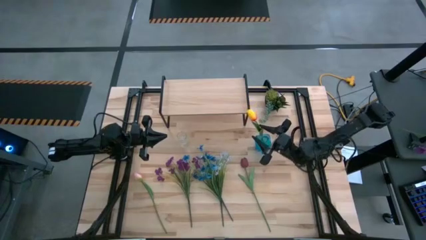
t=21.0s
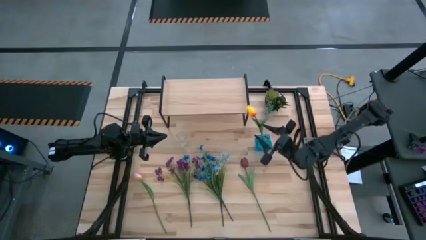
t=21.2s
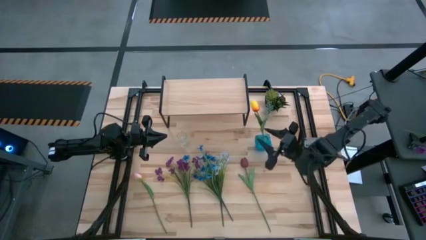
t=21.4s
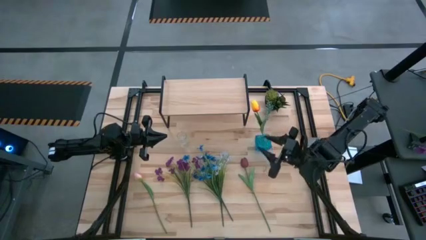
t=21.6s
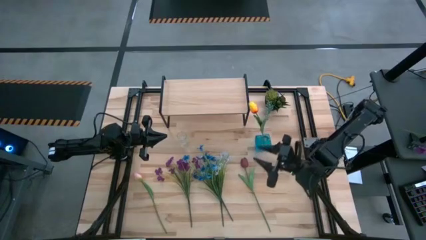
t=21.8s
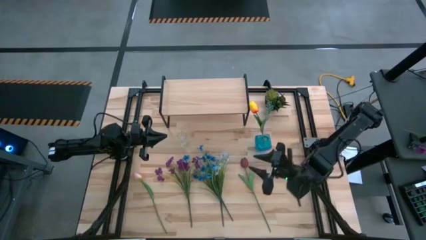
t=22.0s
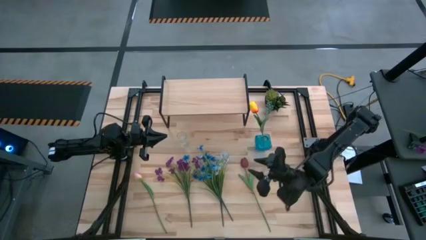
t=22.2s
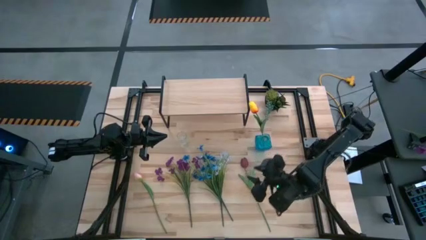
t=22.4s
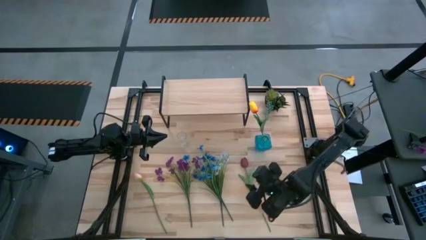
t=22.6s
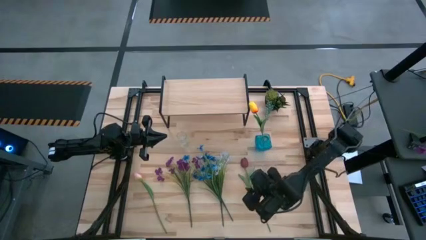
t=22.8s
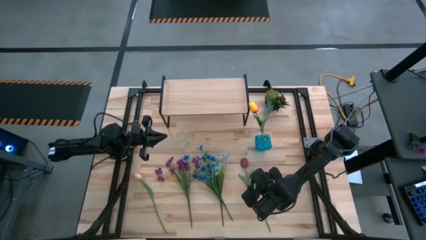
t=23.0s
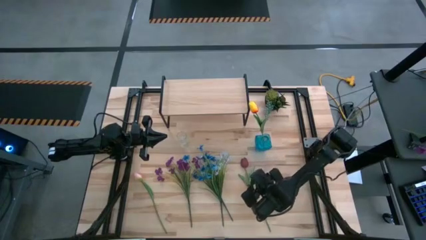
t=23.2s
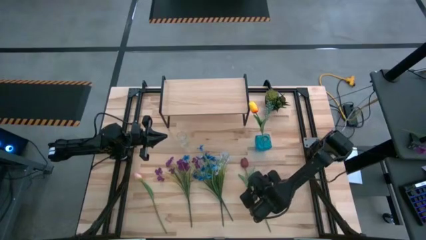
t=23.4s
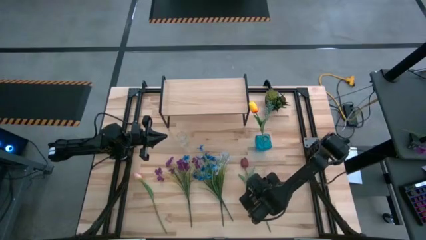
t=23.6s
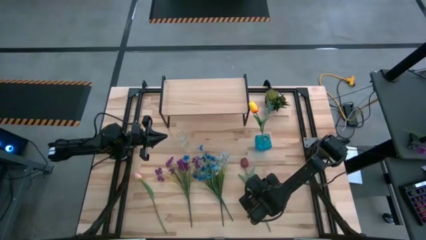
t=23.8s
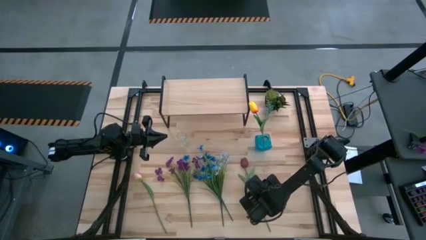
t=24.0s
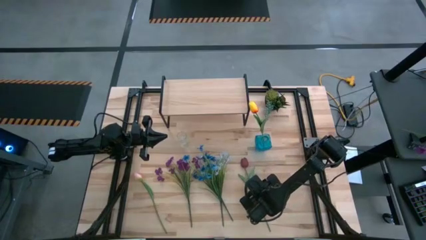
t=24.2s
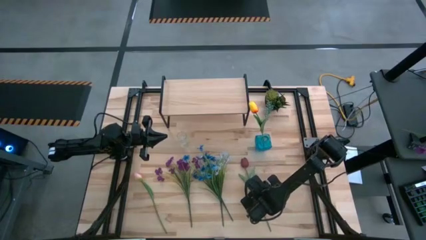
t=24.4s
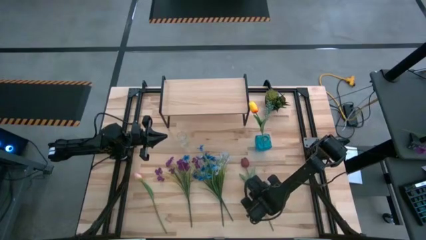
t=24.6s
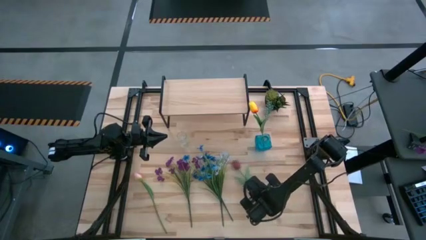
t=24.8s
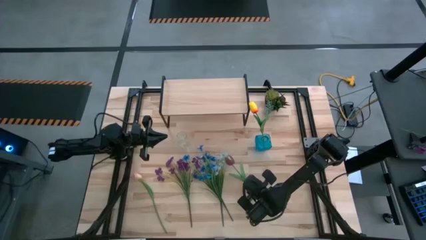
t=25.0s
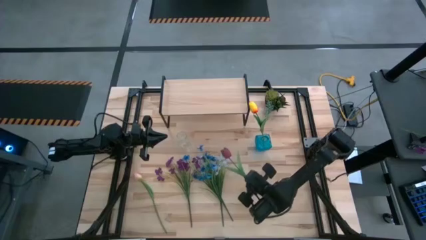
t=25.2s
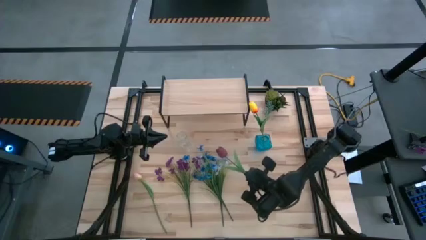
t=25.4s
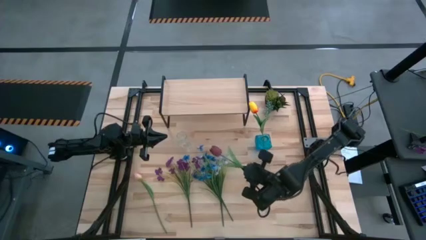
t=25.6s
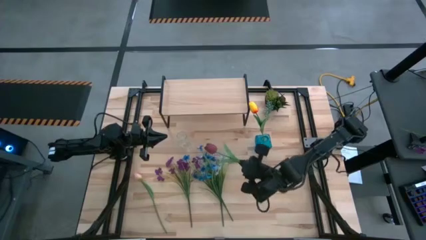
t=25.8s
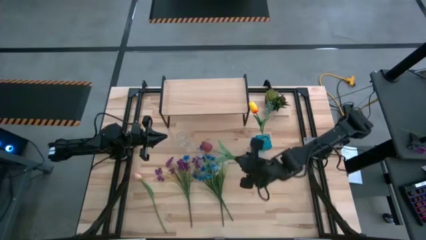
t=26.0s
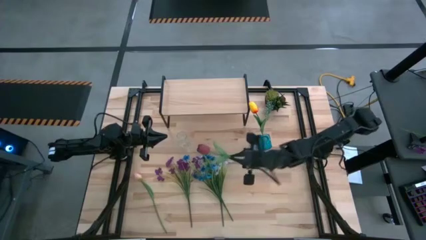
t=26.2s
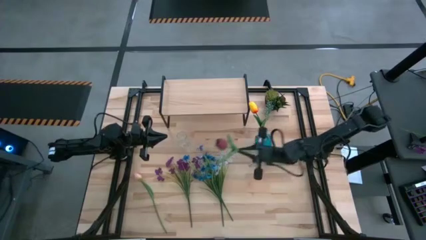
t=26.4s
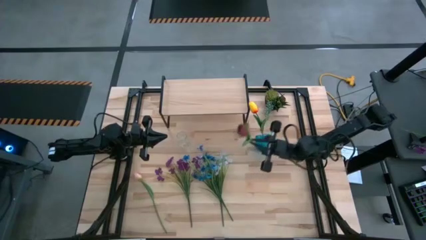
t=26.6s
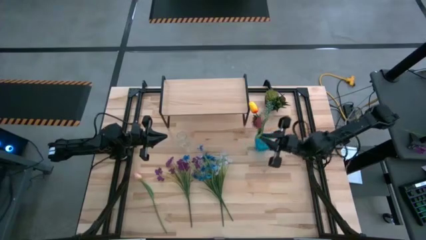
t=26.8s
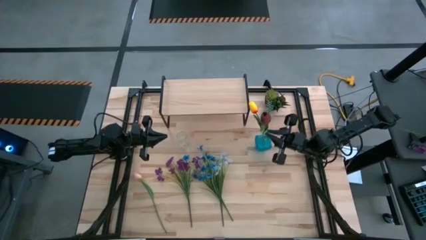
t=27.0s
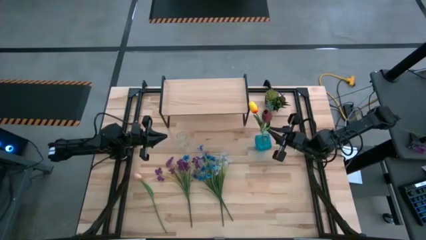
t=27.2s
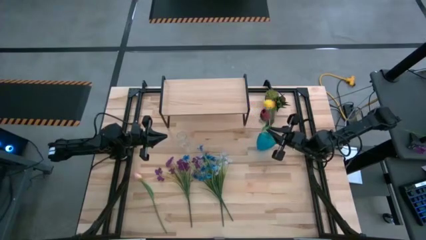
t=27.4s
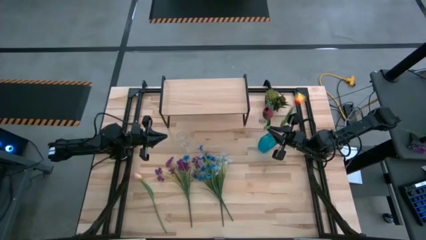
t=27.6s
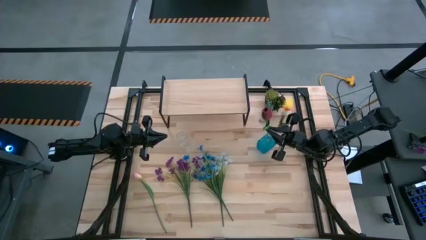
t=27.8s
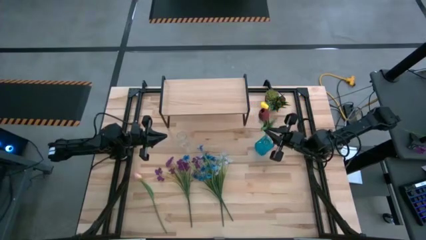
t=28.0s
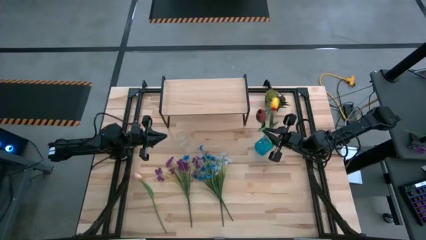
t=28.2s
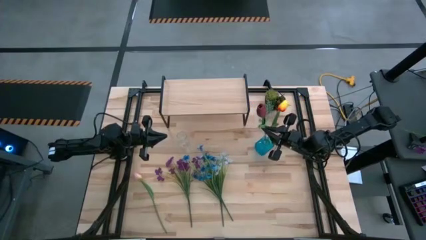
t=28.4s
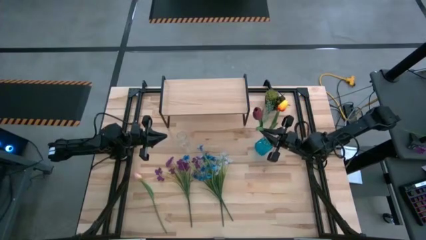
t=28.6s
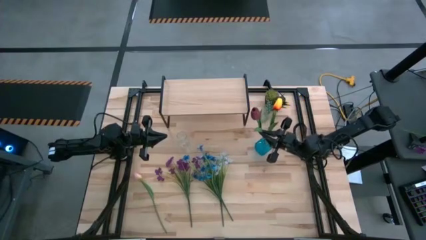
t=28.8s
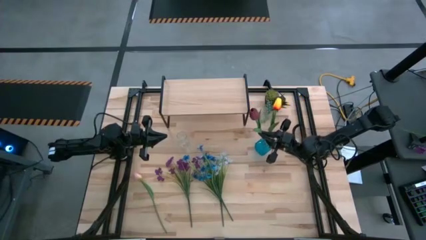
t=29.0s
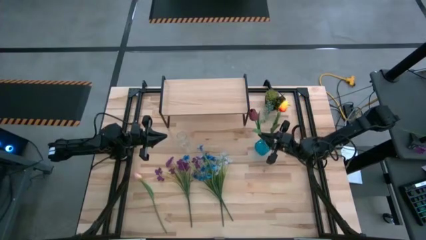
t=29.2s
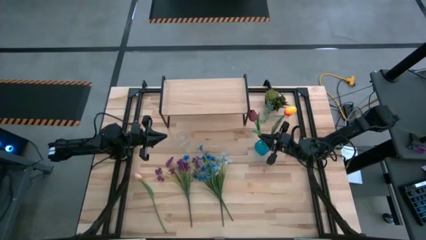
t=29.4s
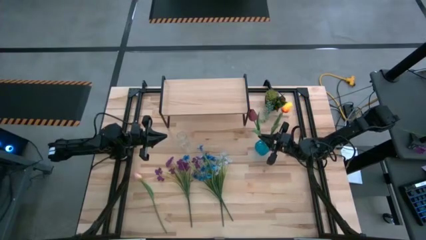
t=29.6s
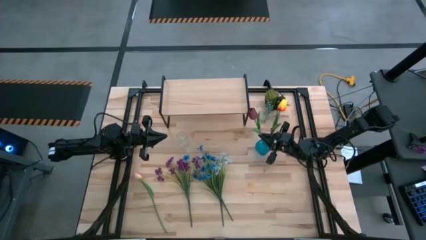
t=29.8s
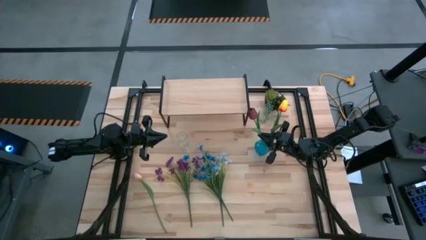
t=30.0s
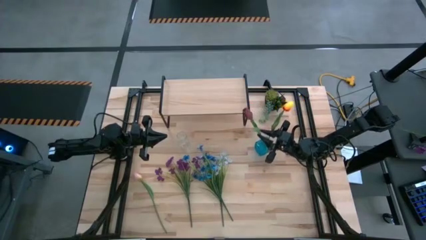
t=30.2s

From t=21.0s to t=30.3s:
Task: Pick and place flowers into a vace then onto a shelf
Put the dark red tulip into the blue transparent vase

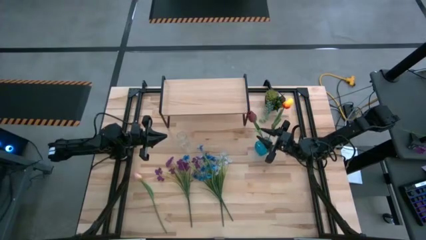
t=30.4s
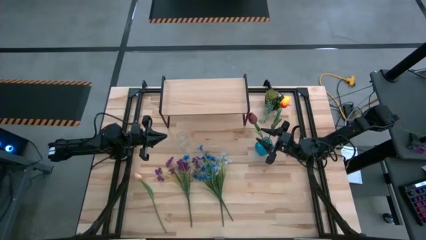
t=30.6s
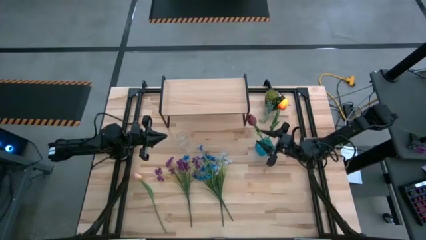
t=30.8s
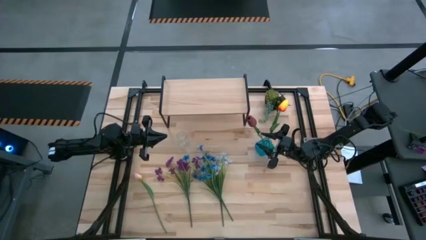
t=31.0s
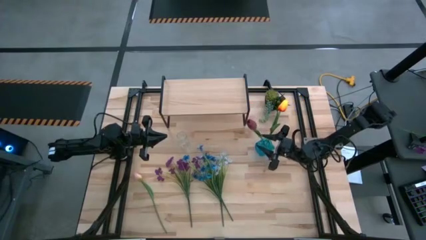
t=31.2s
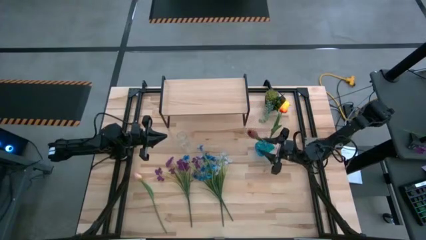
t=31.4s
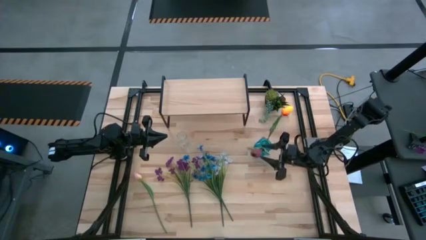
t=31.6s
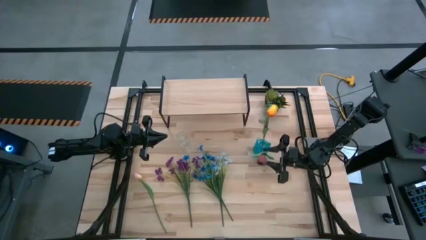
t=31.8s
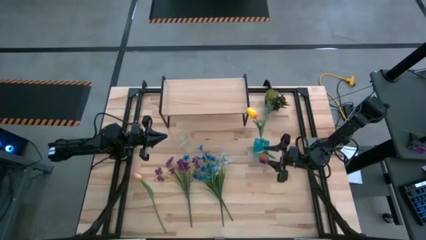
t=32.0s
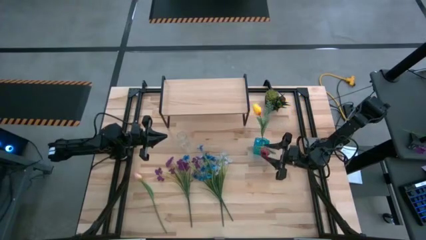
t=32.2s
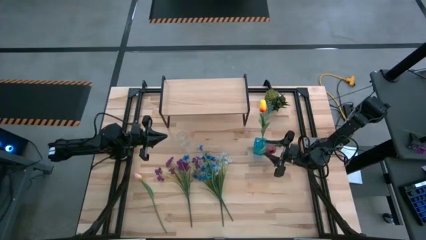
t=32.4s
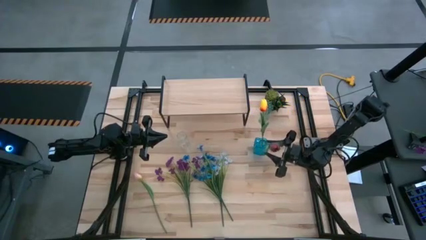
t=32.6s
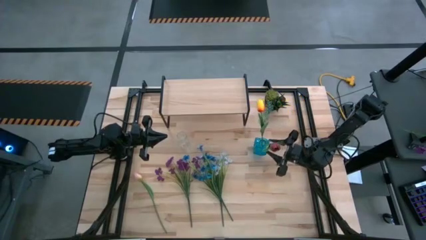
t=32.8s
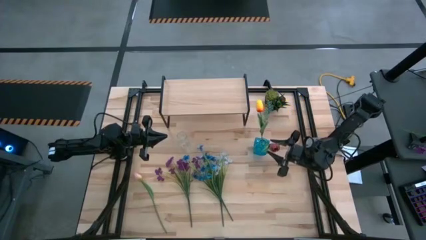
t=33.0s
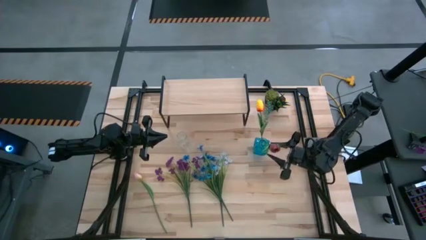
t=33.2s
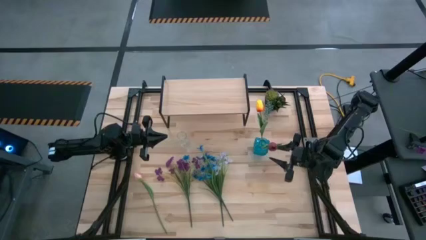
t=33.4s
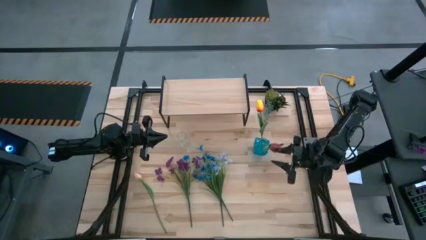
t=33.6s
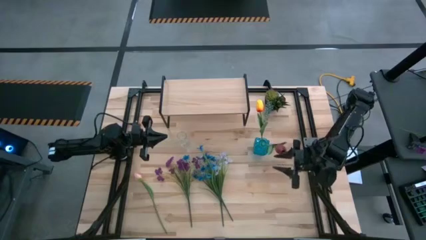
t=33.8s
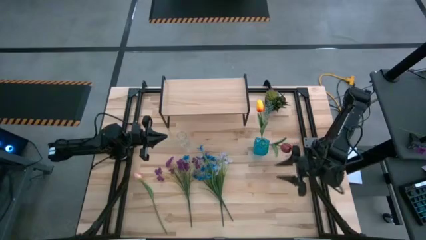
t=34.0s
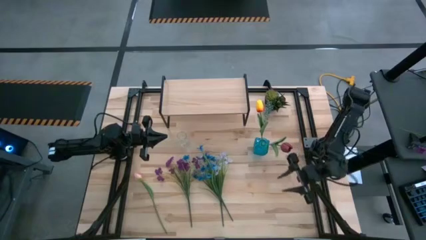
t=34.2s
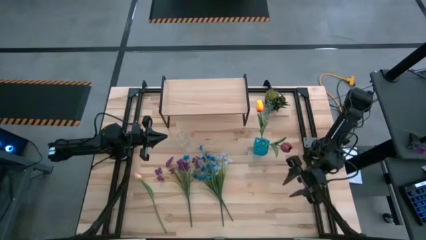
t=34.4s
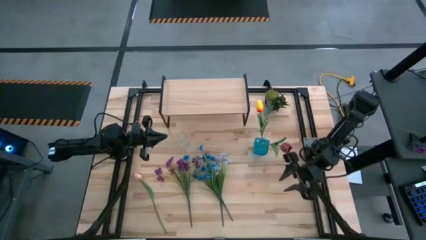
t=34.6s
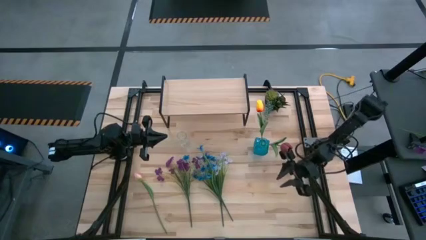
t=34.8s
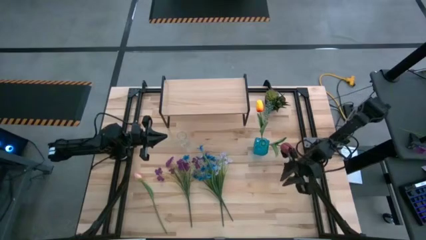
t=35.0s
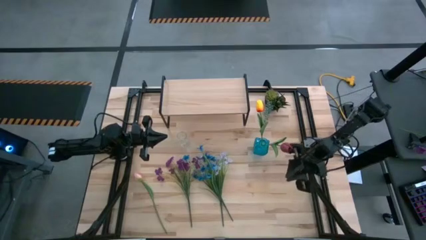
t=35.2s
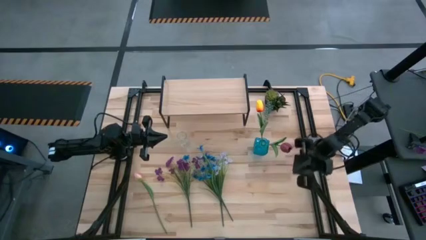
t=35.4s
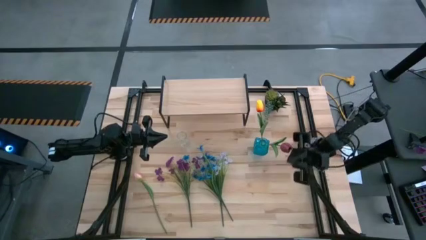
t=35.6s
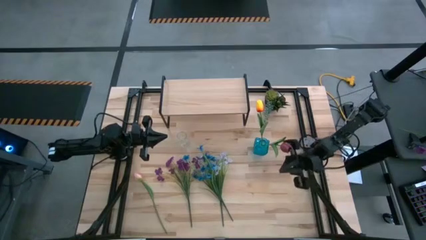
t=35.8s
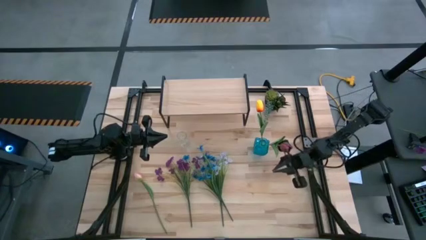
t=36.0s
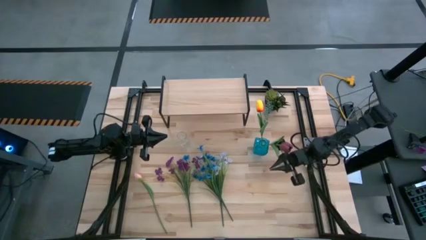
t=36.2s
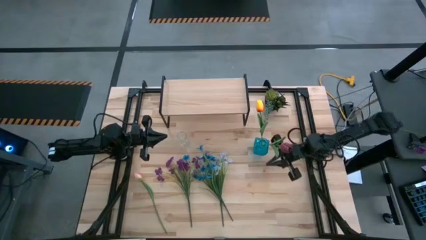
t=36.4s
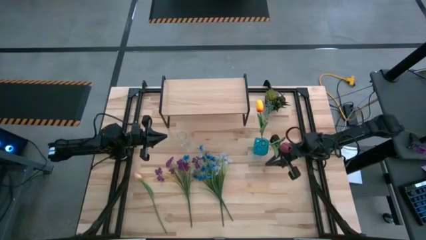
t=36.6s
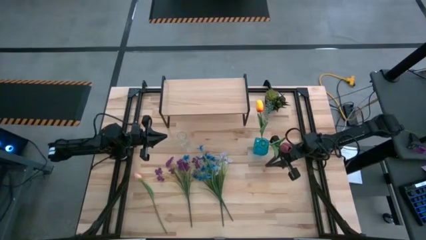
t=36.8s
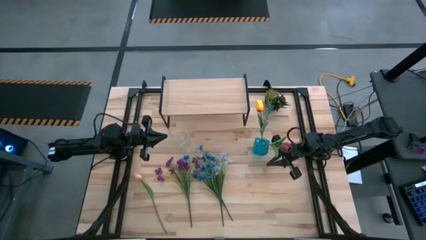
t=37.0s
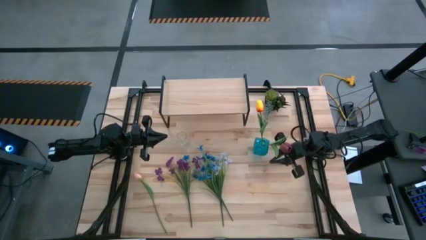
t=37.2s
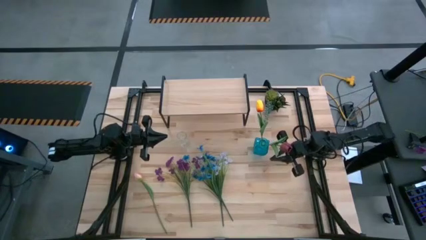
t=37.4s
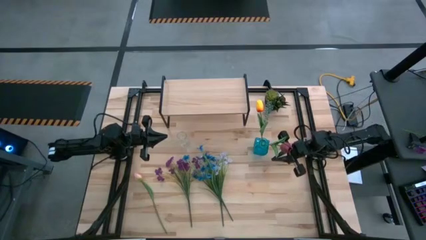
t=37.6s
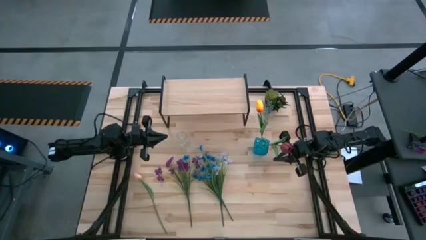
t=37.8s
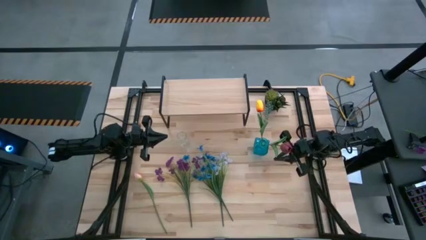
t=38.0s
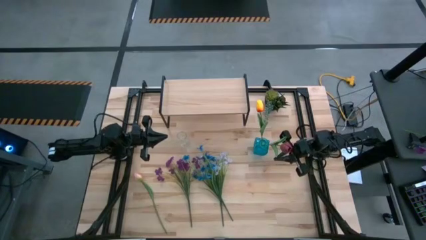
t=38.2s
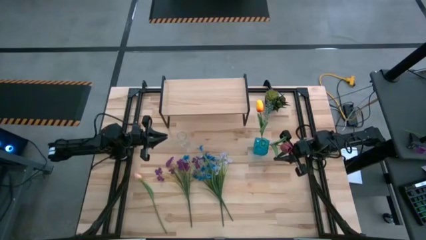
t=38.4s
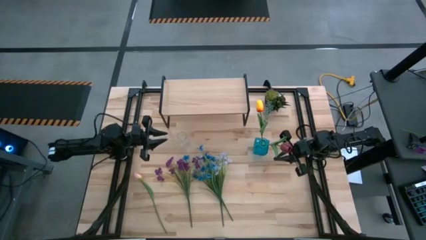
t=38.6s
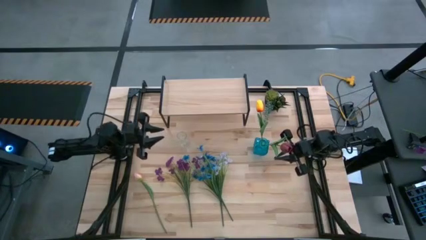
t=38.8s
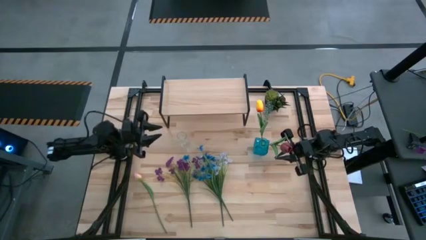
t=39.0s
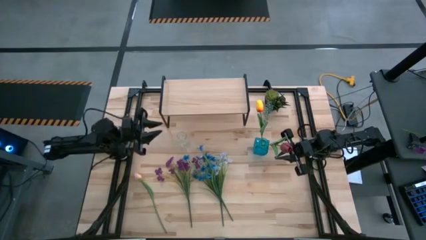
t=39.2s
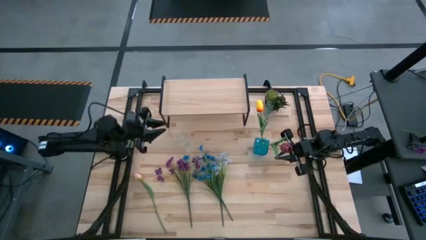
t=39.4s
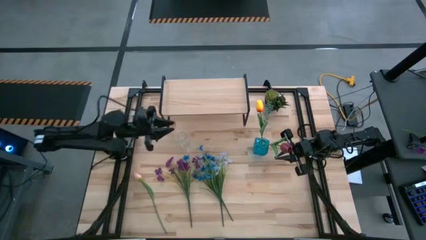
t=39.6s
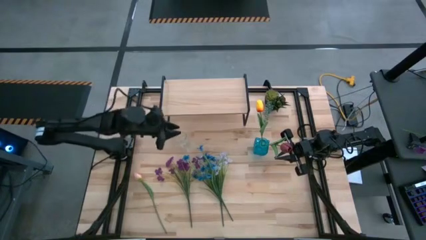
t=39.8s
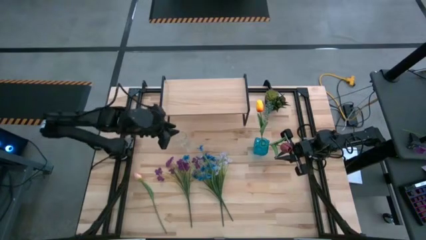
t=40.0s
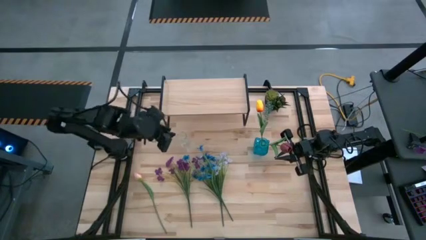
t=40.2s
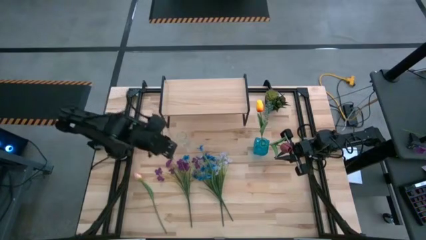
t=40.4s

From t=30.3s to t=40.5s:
Put the pink tulip into the transparent vase
